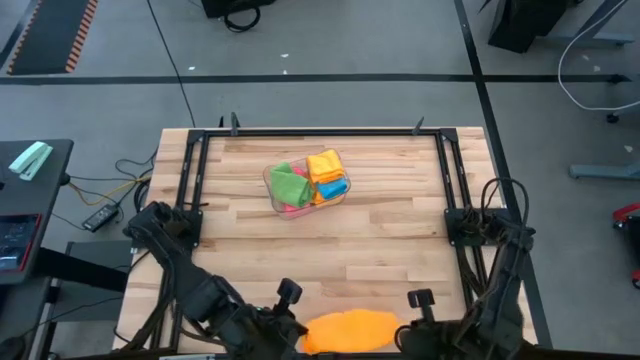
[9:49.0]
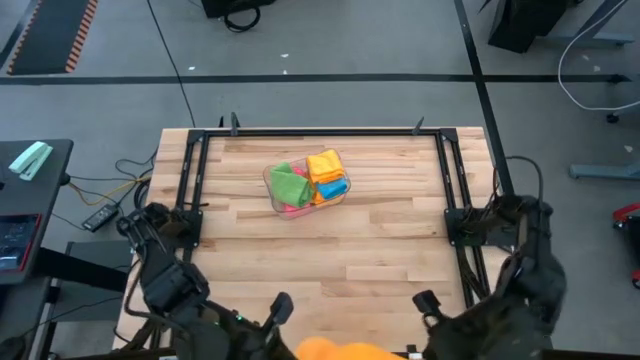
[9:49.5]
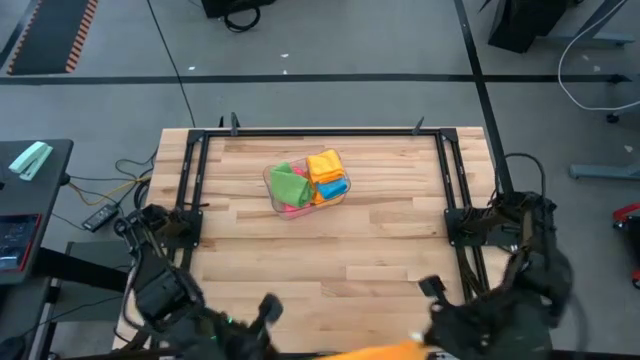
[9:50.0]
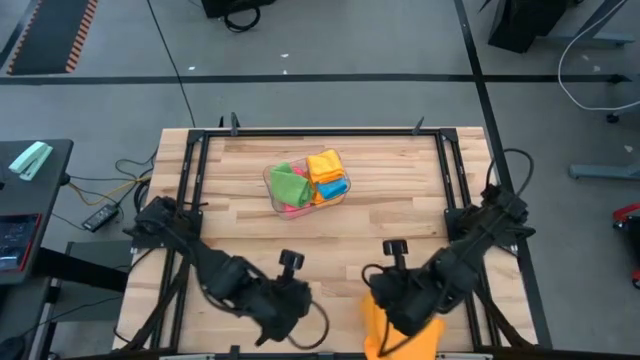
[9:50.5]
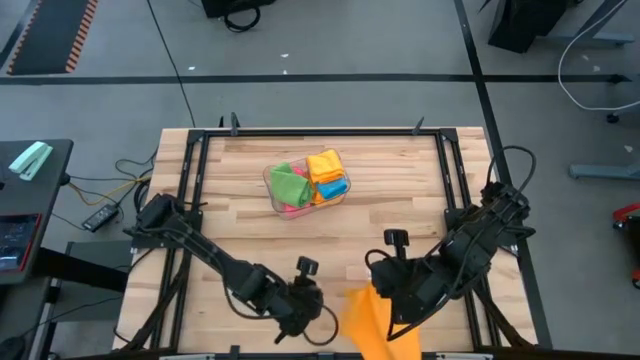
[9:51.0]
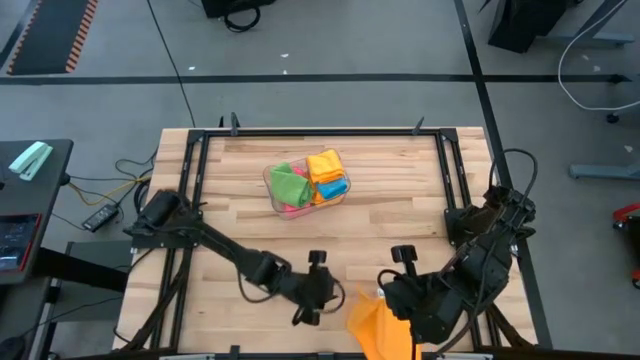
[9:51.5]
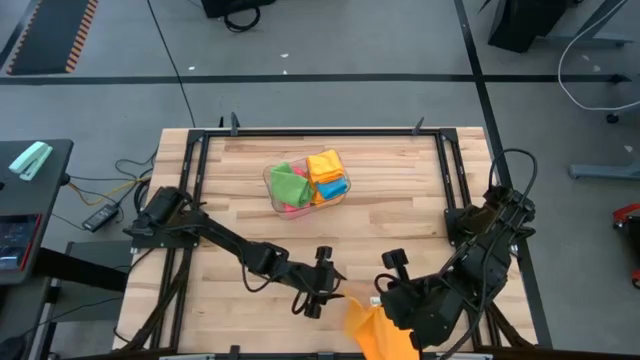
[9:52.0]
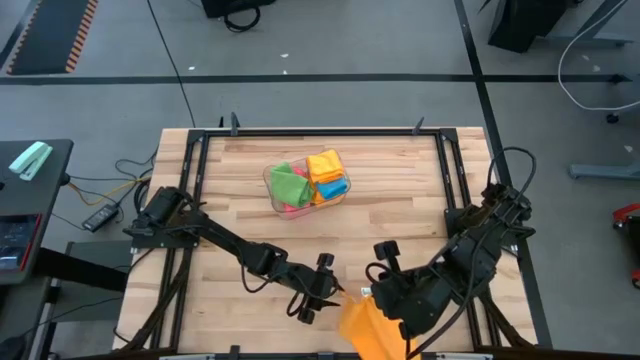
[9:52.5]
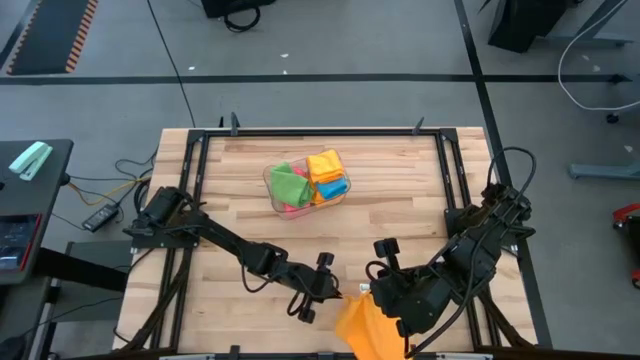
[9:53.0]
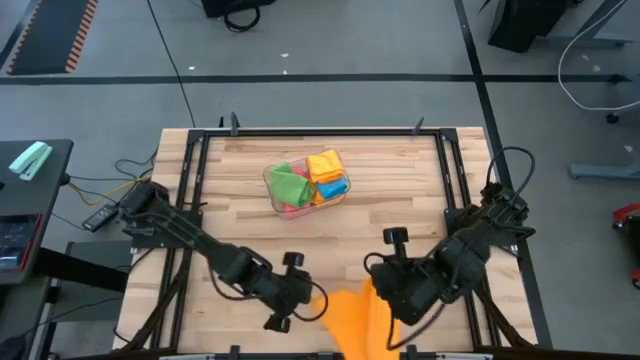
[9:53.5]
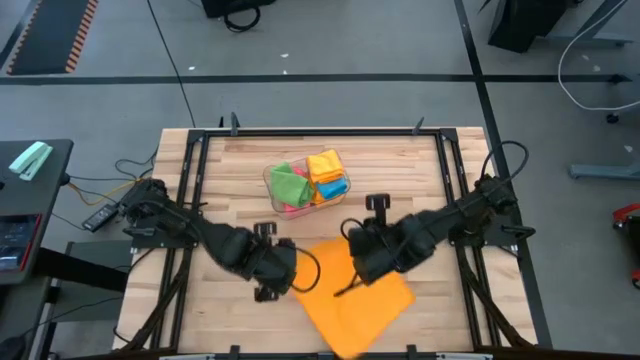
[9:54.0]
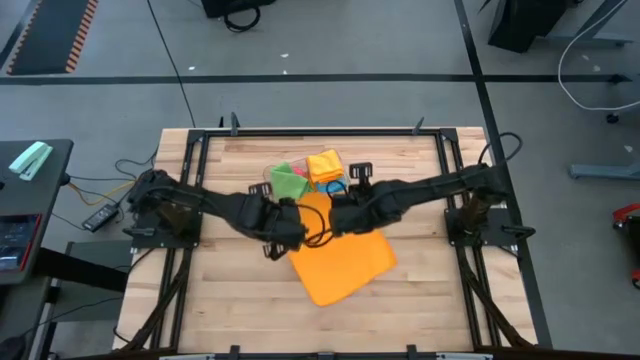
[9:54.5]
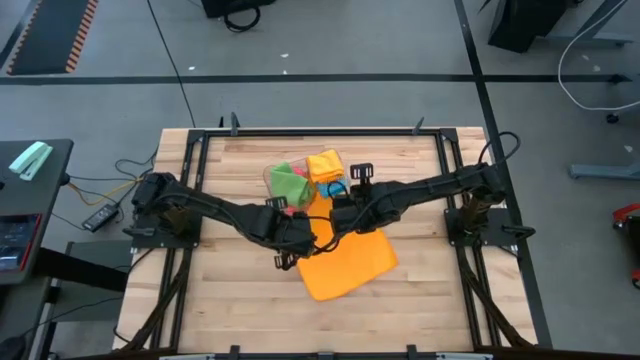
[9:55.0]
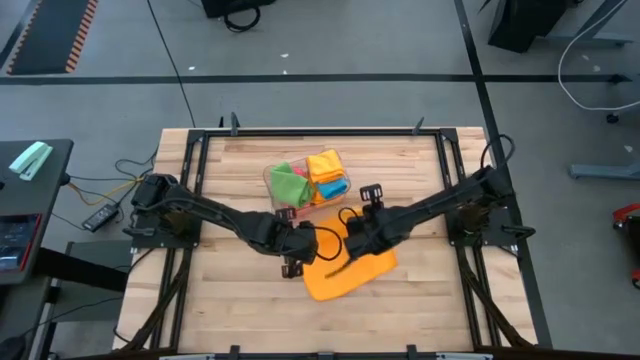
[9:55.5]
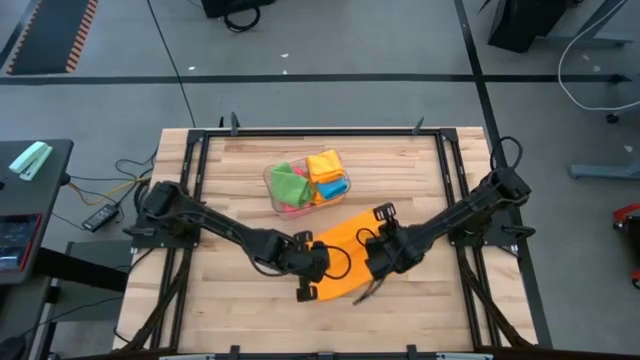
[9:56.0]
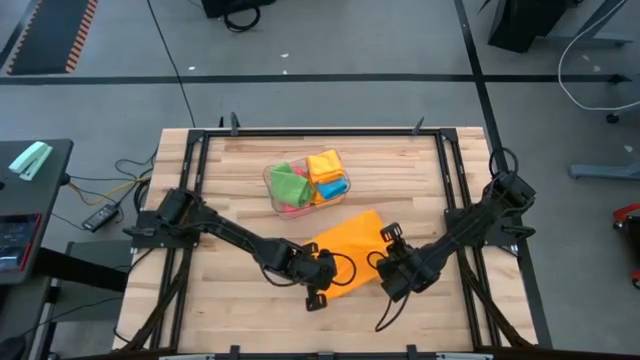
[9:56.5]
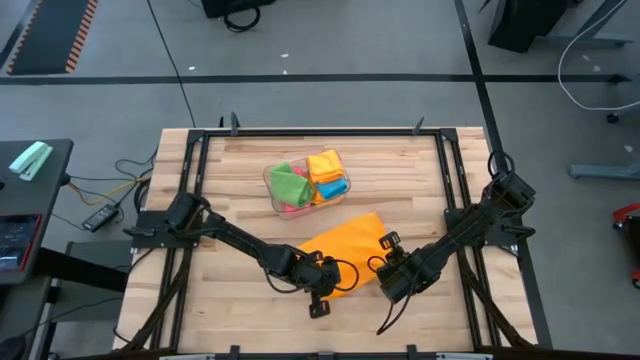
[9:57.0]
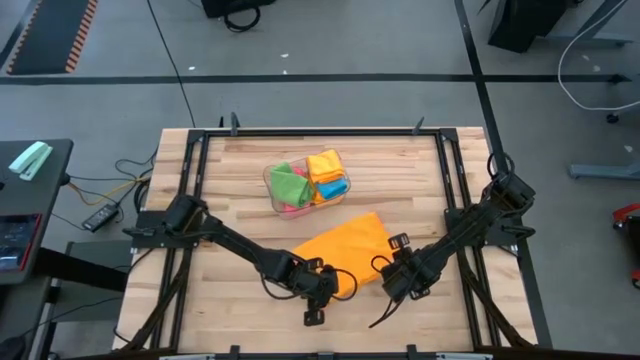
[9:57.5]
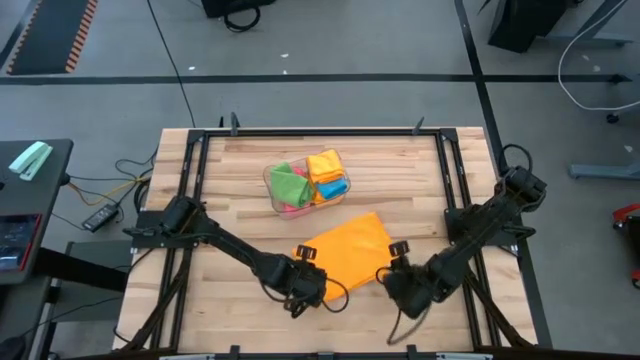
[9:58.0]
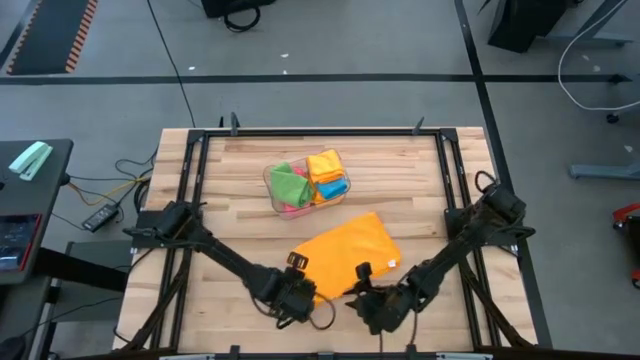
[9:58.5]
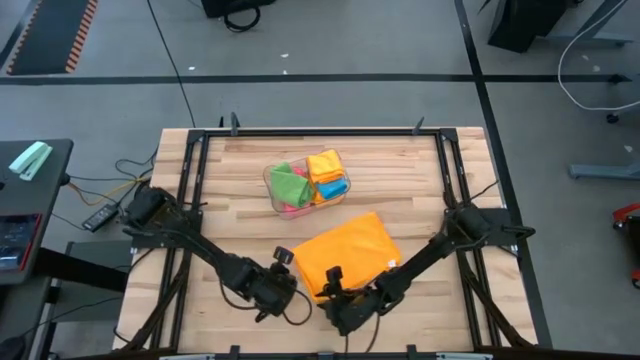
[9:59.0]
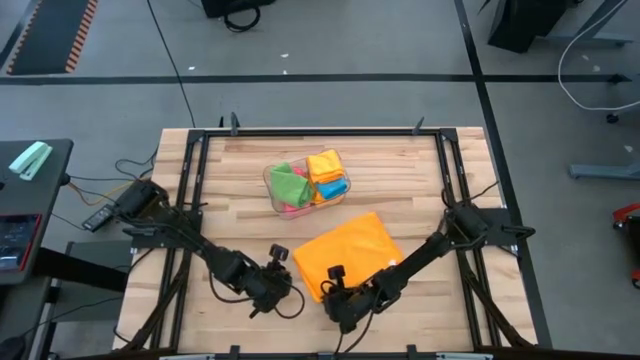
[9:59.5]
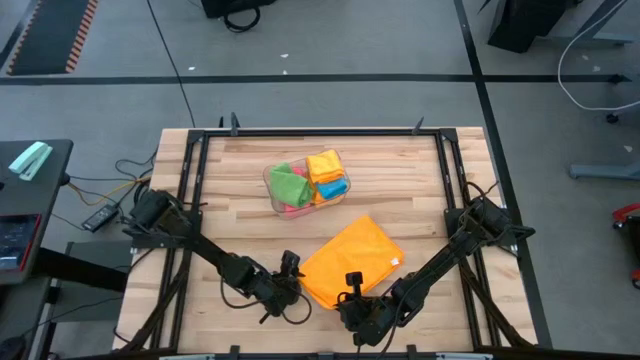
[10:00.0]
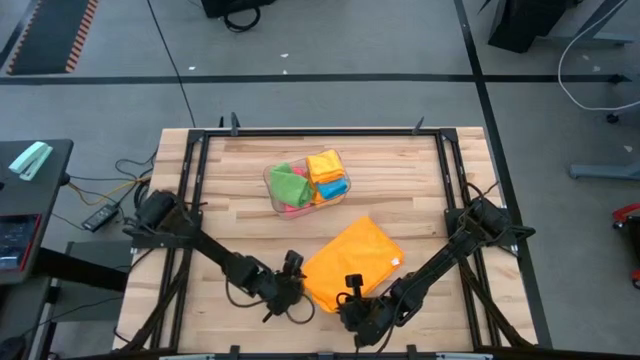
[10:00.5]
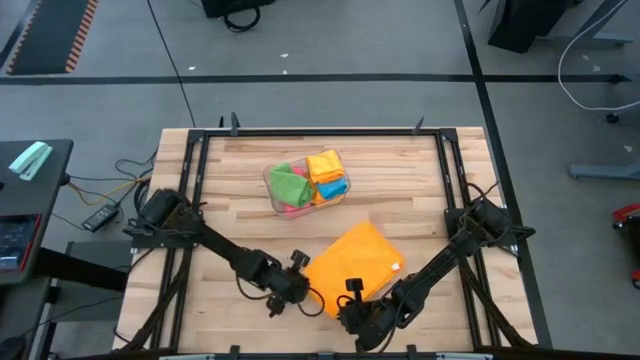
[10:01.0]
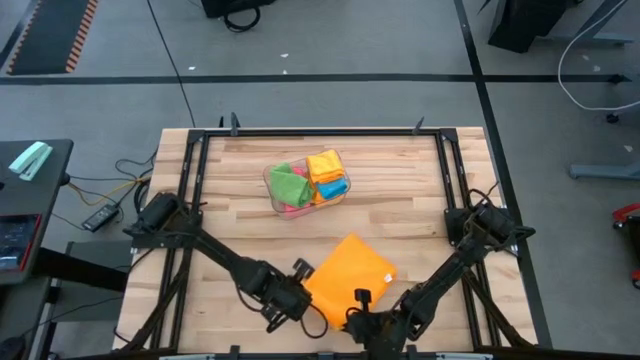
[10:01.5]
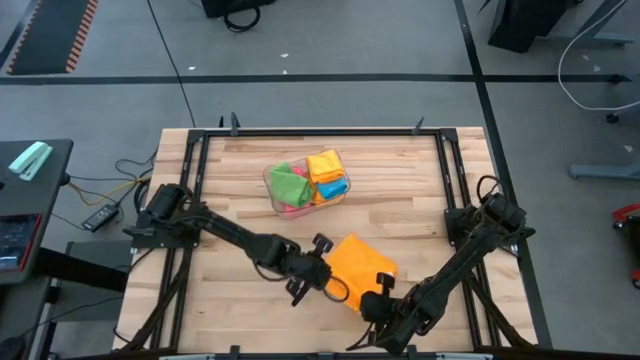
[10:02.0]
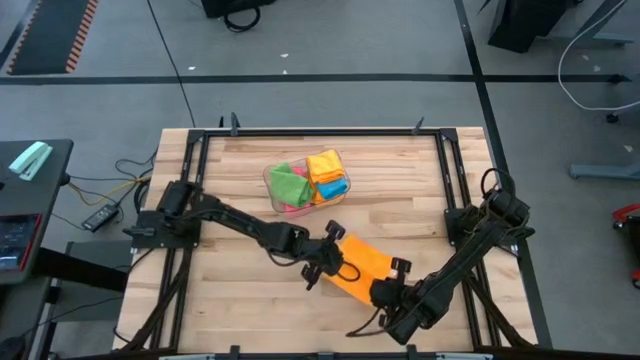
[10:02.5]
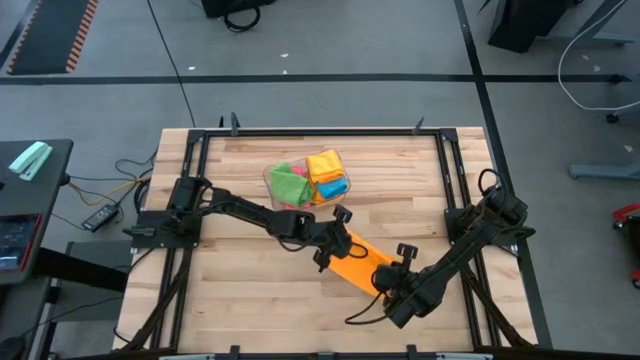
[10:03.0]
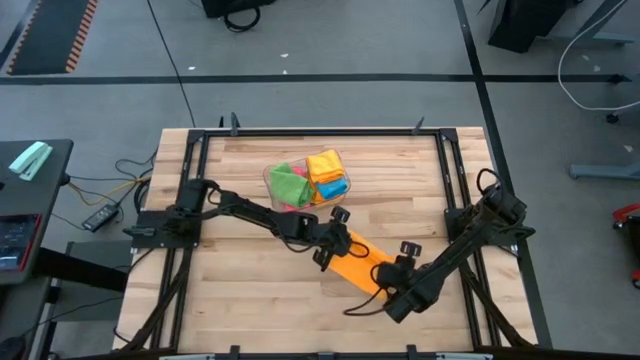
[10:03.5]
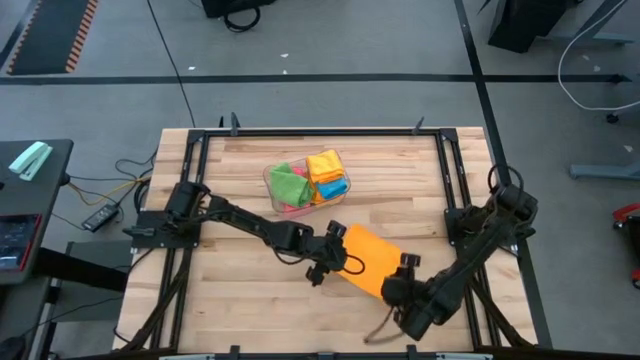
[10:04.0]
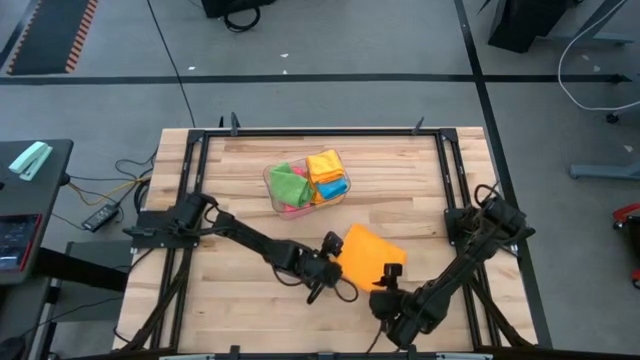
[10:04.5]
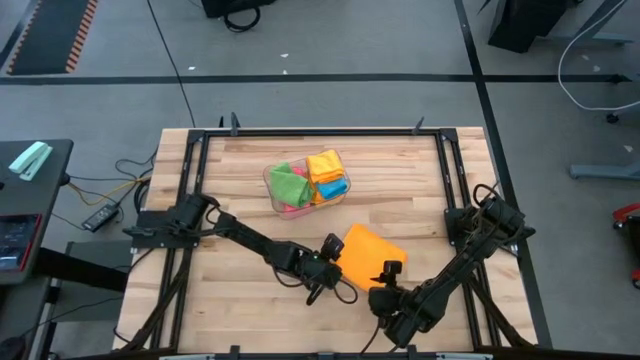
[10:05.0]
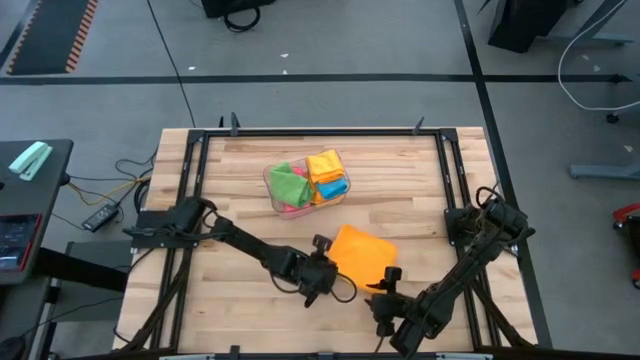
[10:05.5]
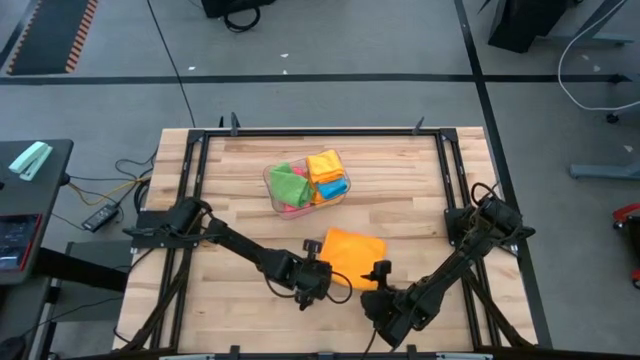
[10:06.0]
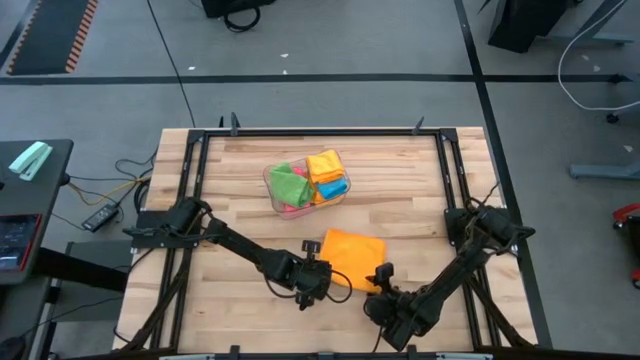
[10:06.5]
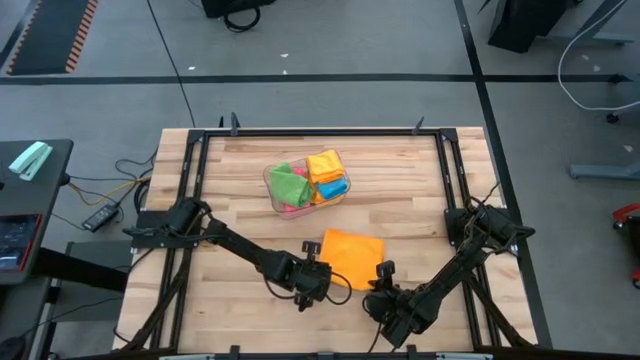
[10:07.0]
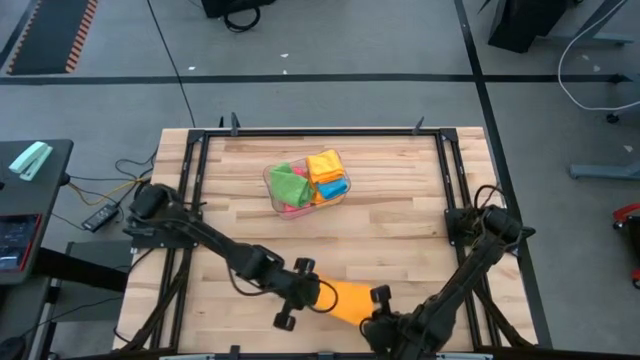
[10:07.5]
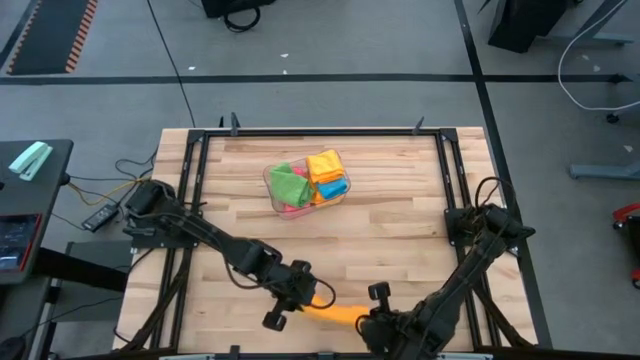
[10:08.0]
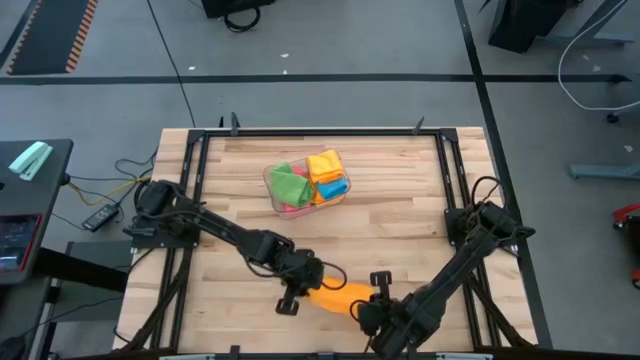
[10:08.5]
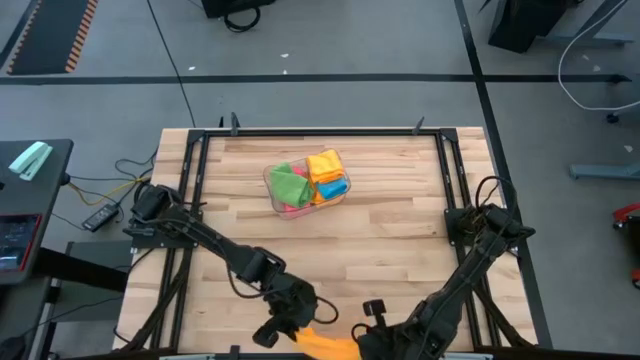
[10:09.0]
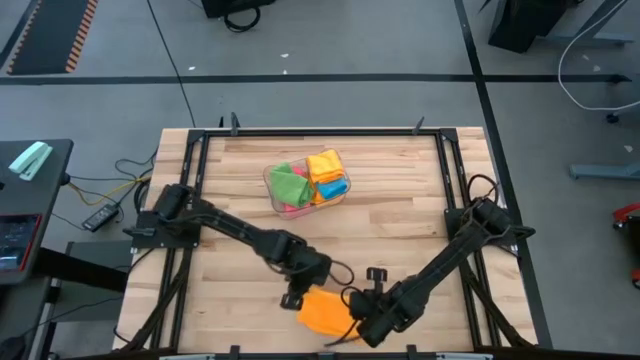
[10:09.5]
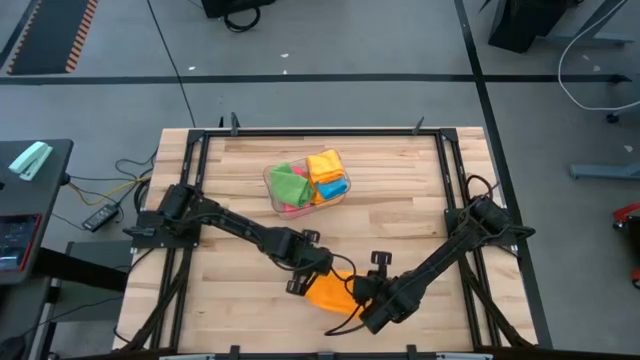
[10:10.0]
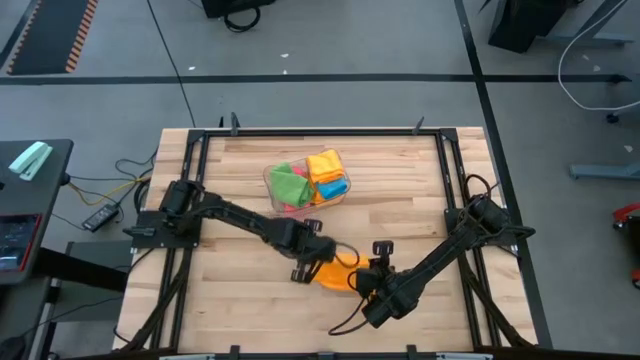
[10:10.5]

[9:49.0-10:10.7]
Task: Fold microfiber towels
Fold the orange microfiber cloth
